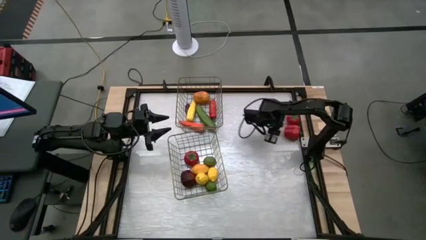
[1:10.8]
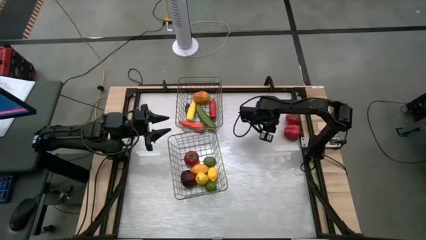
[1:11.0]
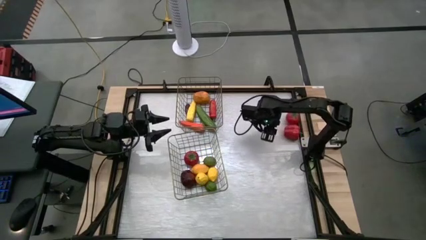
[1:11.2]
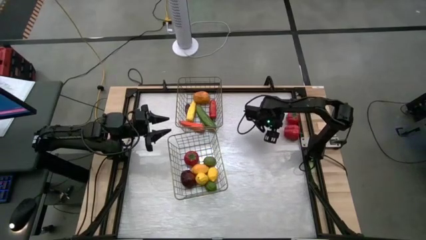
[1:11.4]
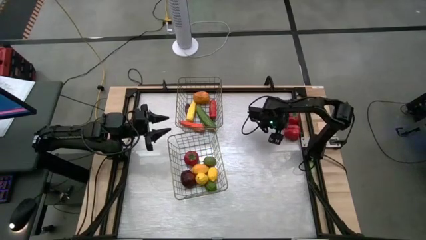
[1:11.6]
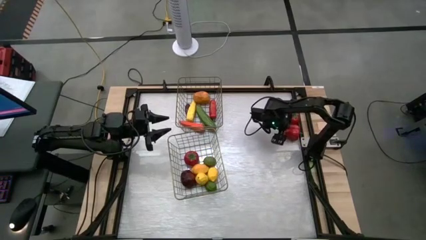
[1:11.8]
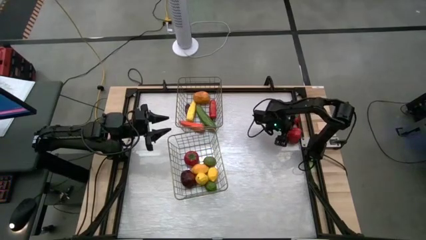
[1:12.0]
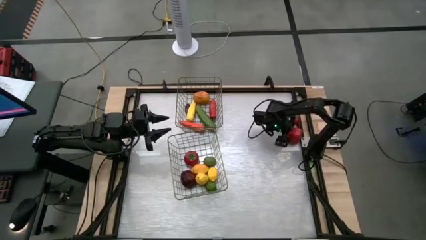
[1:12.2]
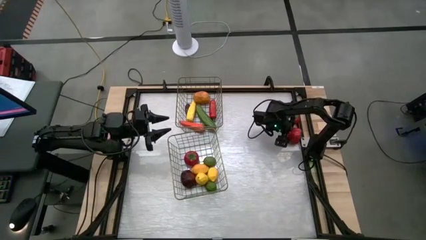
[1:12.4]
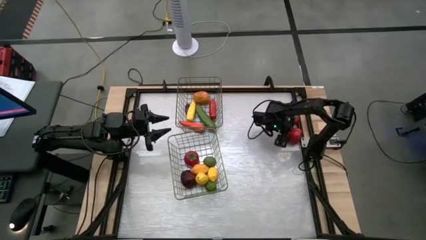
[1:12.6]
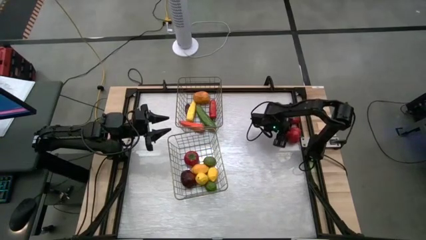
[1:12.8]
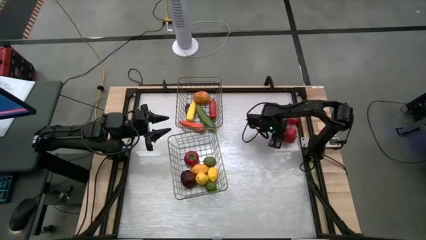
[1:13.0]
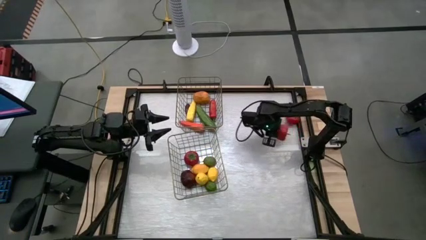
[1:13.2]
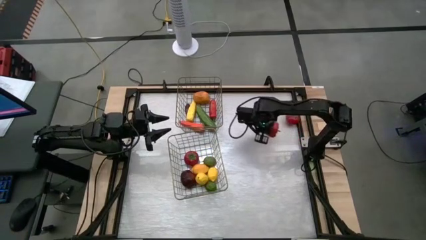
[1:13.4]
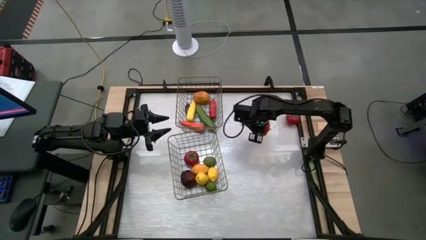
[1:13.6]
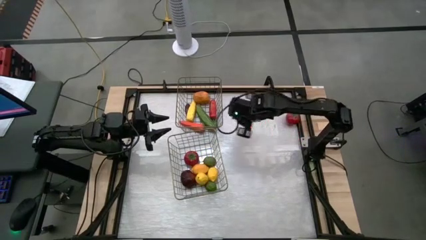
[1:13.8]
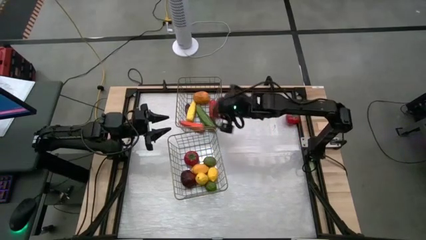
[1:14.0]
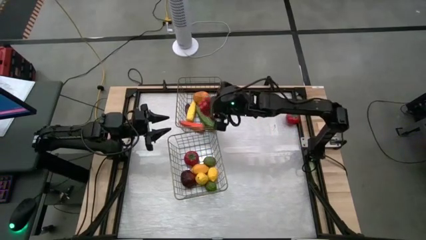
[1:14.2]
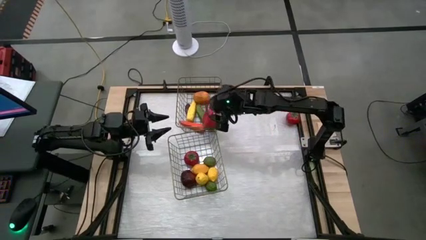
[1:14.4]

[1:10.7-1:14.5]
Task: Sort produce into baskets
Put the top red bell pepper into the bottom basket

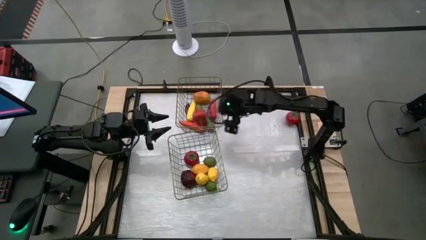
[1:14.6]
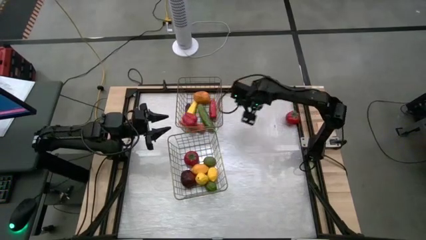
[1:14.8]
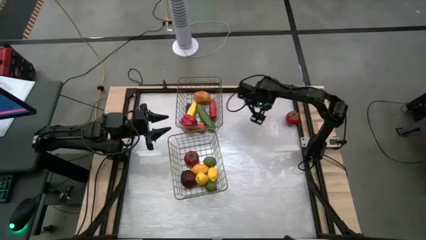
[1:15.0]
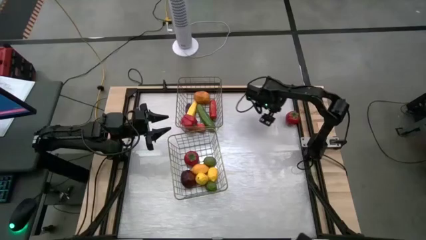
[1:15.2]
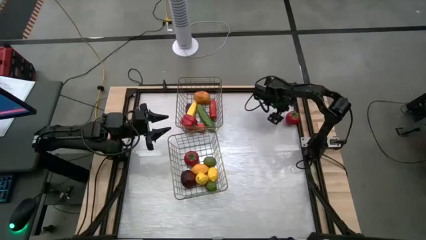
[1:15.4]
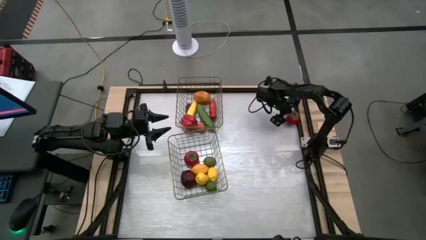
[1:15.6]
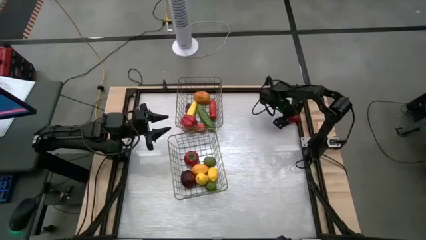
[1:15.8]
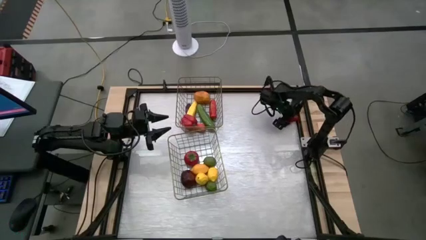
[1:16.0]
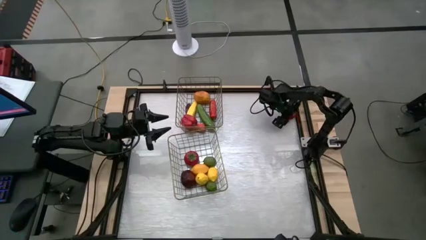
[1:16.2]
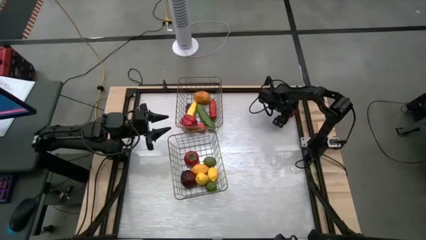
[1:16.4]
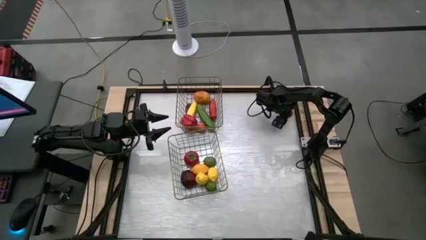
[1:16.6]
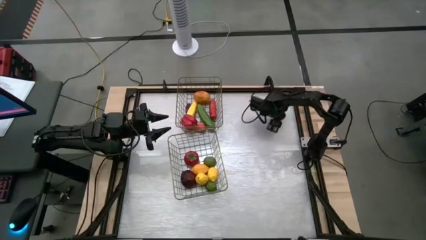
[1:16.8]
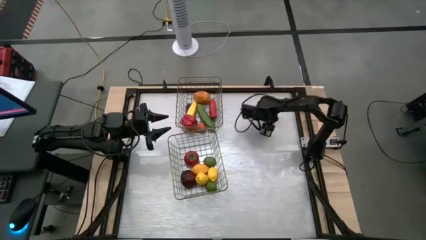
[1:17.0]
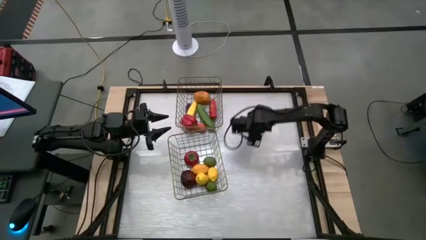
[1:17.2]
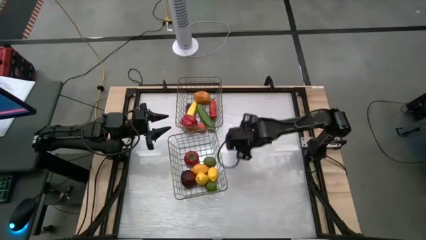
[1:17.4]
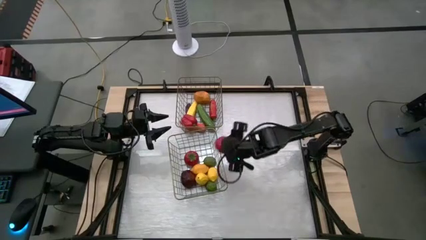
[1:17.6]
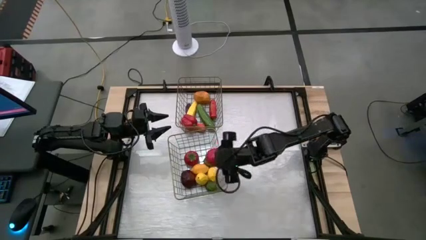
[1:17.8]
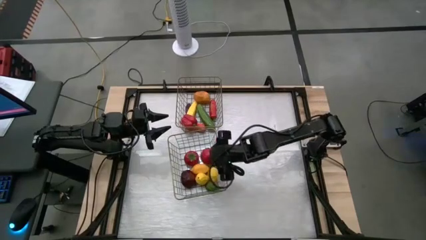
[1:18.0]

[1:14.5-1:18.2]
Put the red tomato into the basket

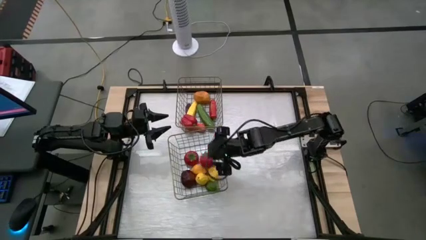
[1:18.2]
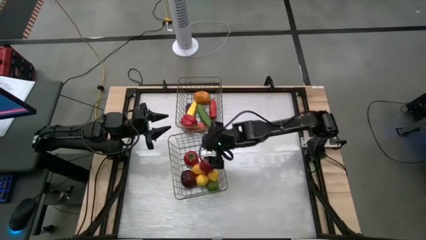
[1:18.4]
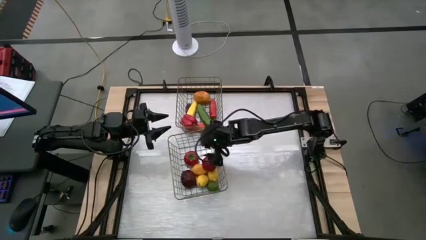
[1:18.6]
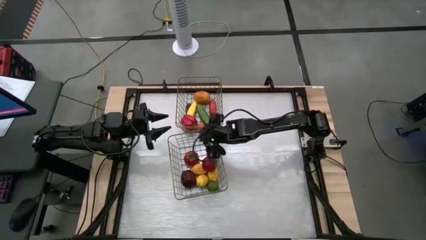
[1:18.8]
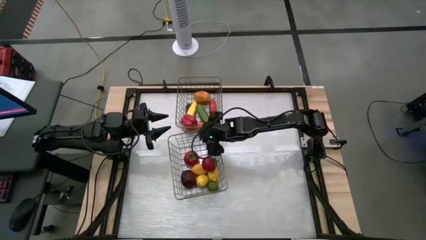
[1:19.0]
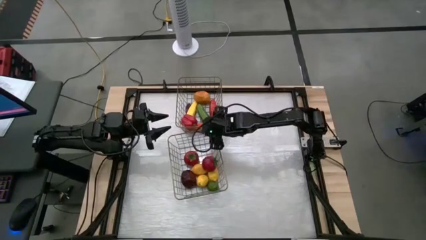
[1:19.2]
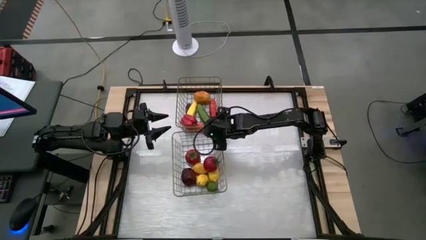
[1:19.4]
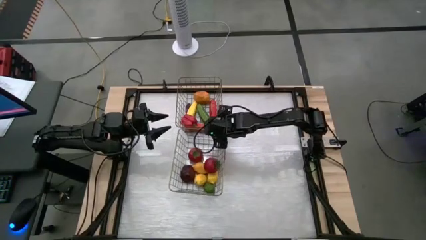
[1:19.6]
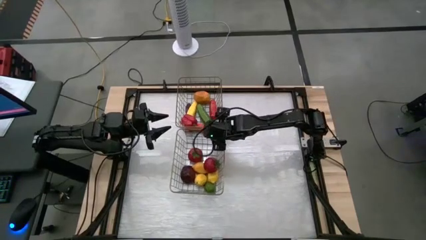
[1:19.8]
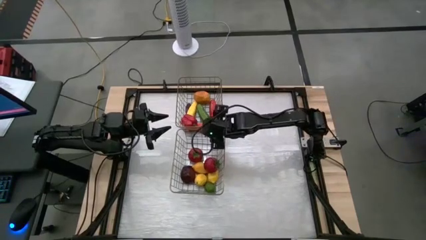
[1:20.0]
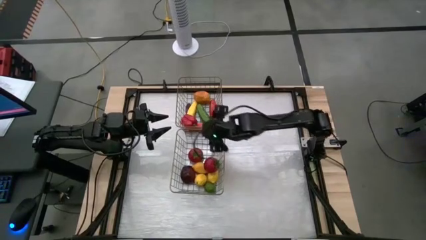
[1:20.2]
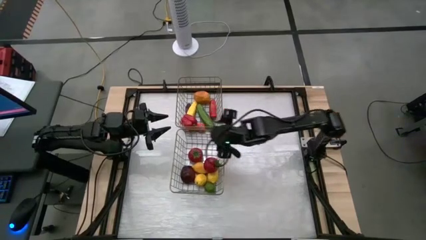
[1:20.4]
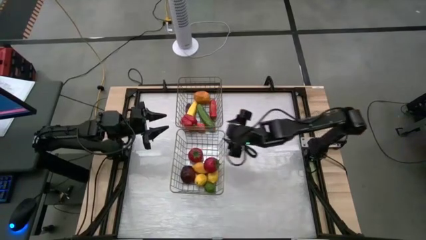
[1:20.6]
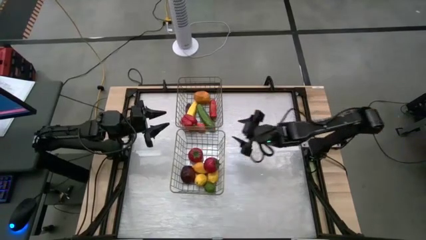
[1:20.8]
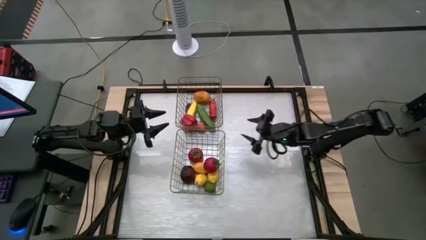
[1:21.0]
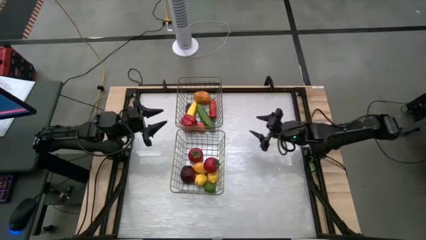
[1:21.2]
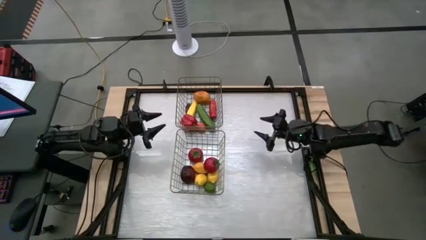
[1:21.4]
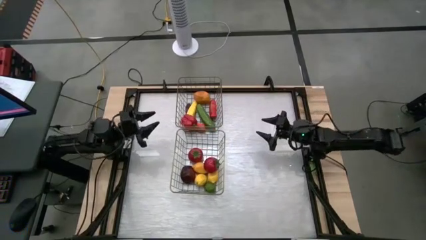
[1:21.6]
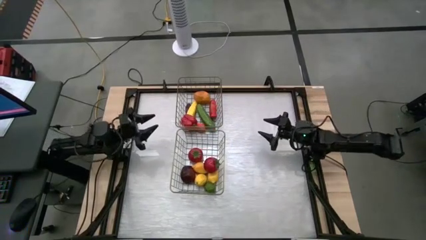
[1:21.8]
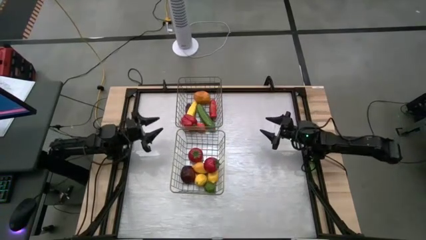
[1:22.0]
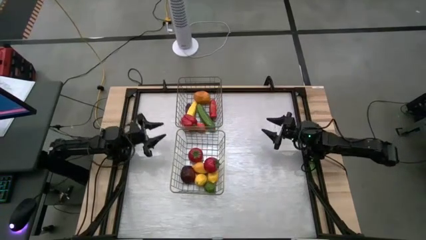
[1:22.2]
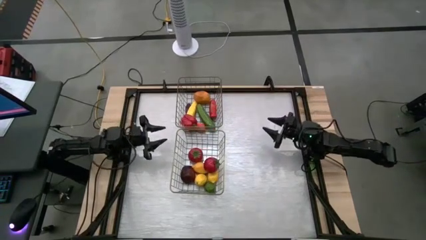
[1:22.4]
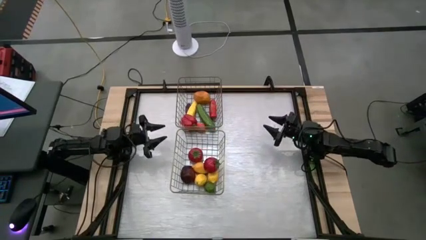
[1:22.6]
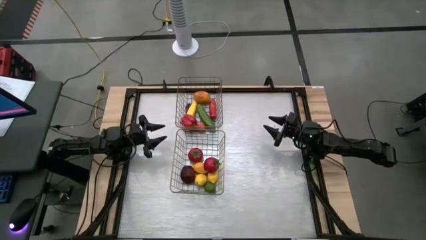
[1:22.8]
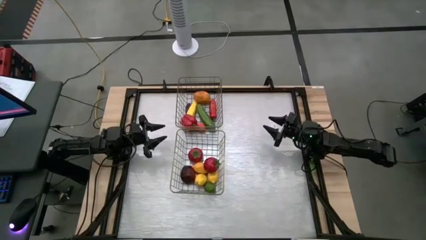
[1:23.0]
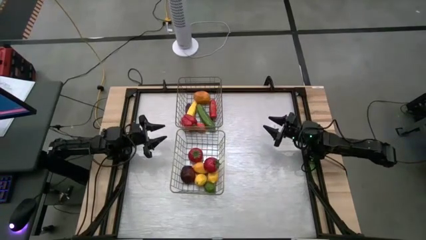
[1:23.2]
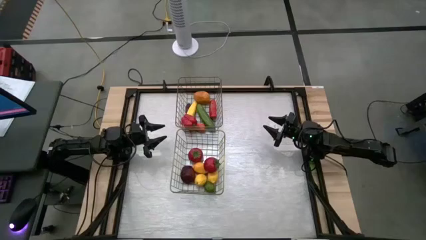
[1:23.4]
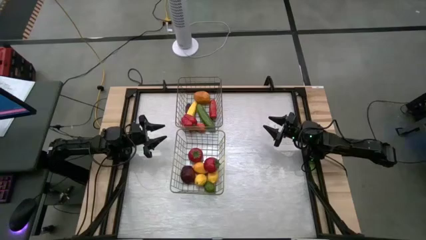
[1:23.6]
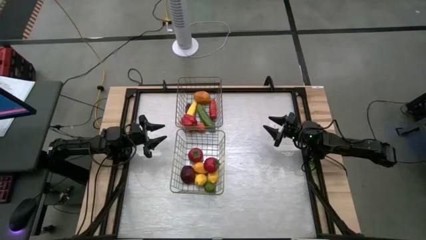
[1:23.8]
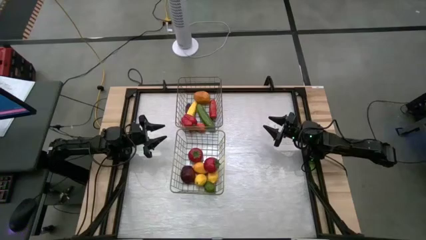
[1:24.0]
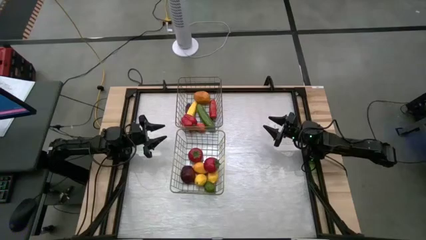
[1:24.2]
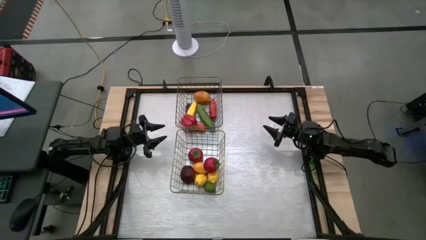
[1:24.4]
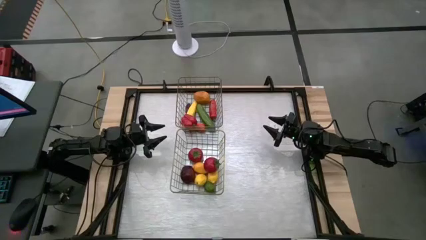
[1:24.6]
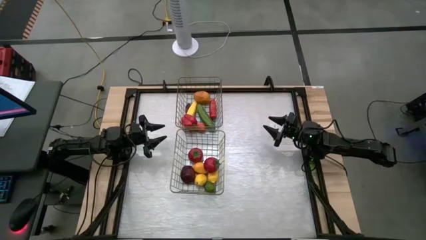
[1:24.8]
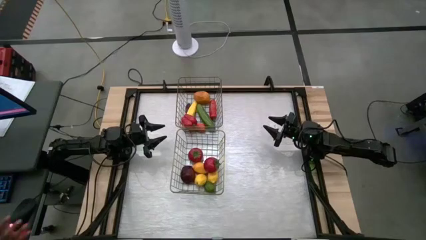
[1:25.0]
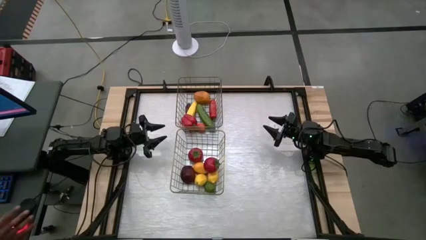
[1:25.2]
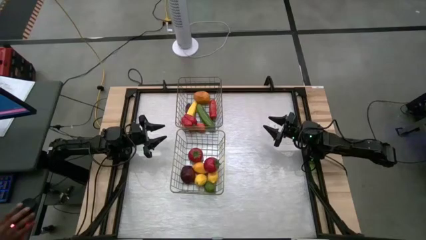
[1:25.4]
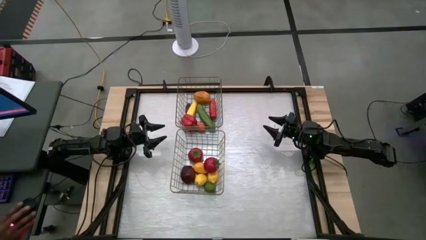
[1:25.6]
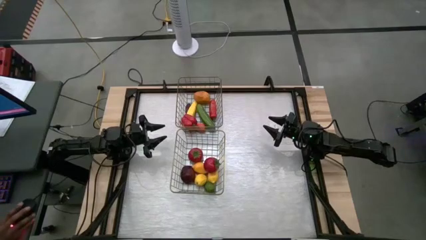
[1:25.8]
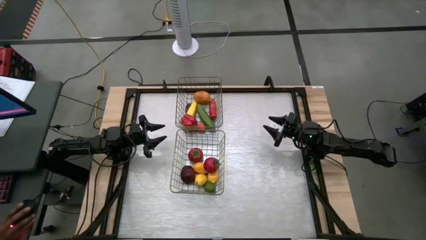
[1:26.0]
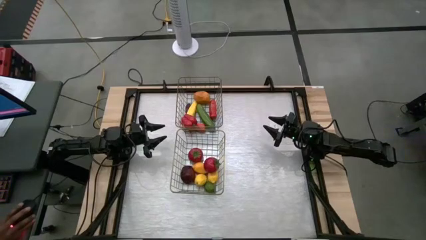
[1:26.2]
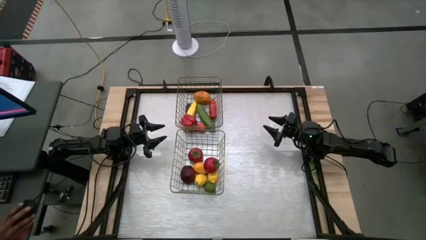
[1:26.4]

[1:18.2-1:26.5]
Return to Home Position
